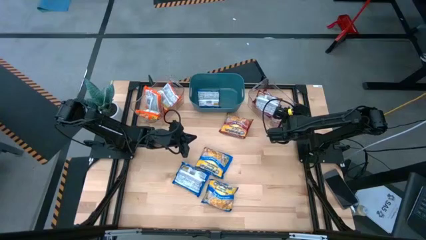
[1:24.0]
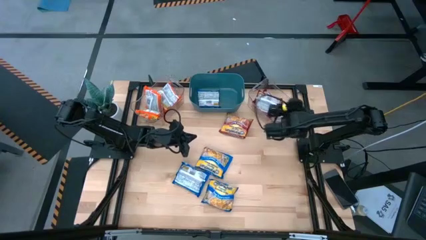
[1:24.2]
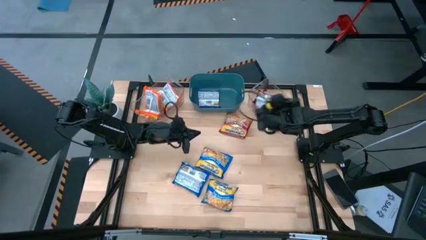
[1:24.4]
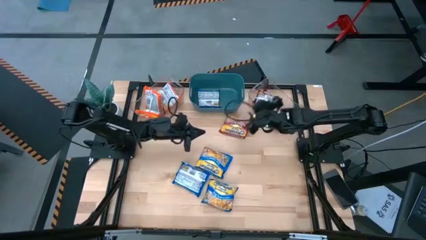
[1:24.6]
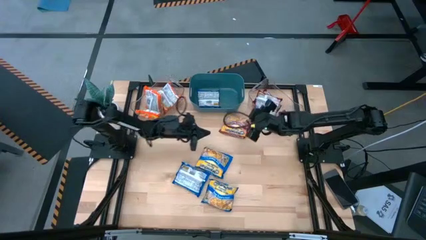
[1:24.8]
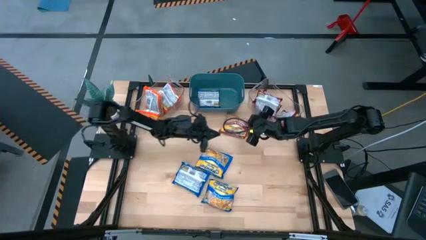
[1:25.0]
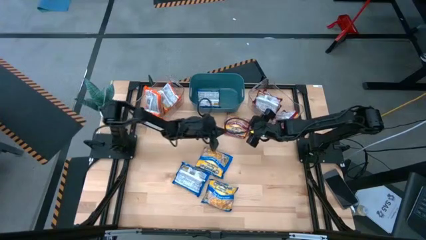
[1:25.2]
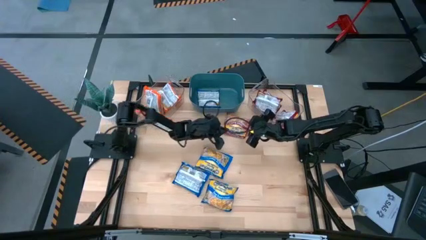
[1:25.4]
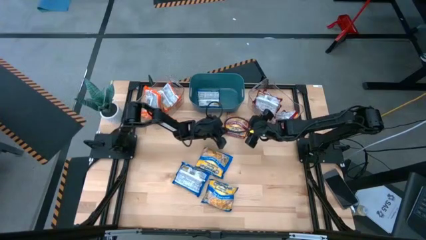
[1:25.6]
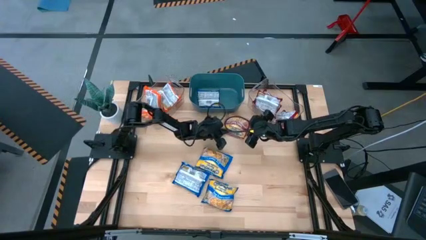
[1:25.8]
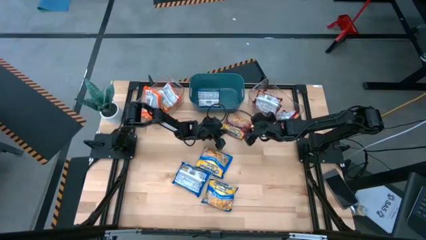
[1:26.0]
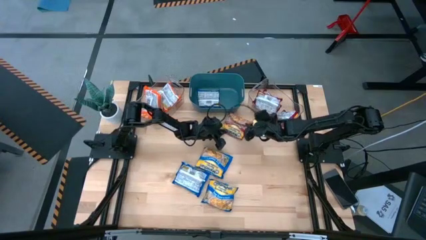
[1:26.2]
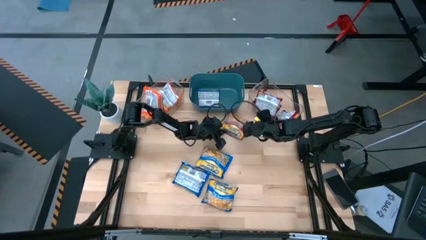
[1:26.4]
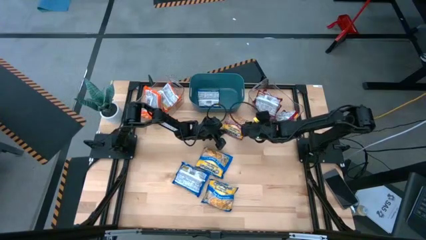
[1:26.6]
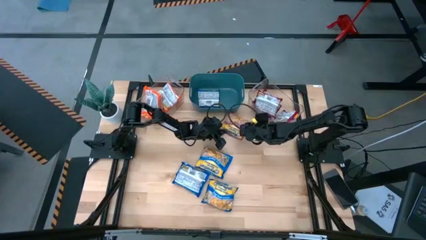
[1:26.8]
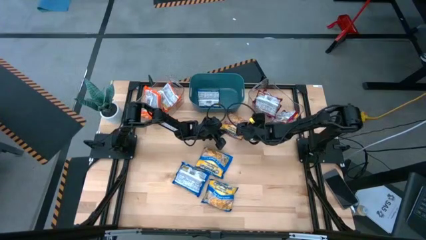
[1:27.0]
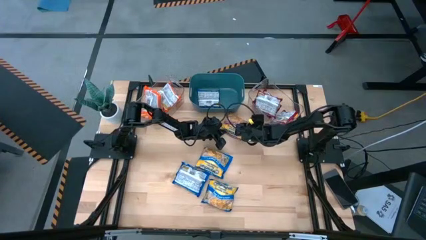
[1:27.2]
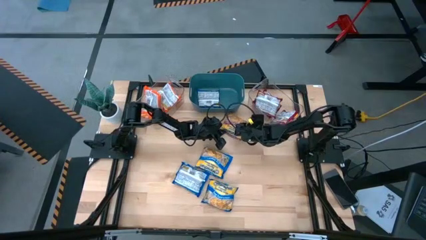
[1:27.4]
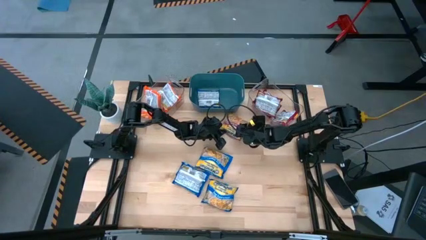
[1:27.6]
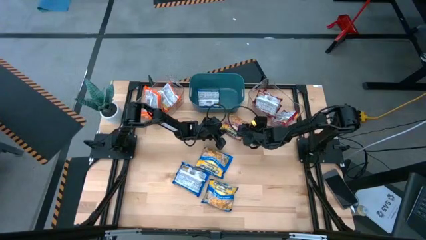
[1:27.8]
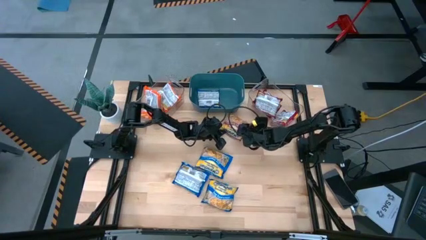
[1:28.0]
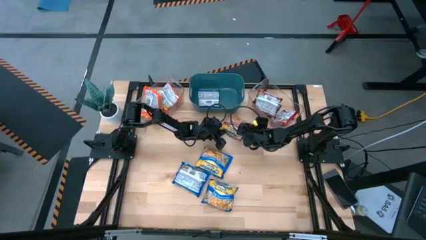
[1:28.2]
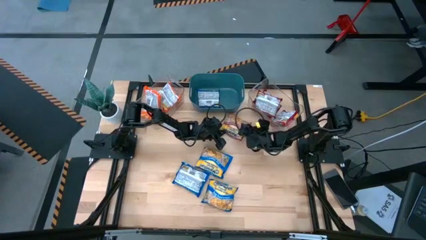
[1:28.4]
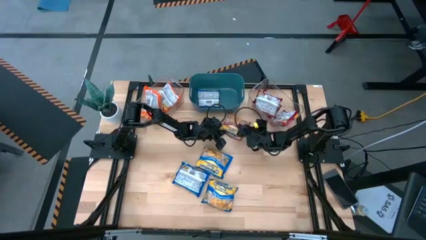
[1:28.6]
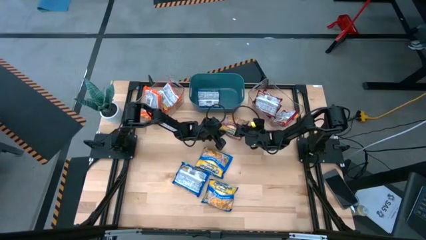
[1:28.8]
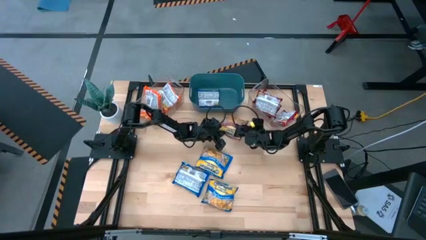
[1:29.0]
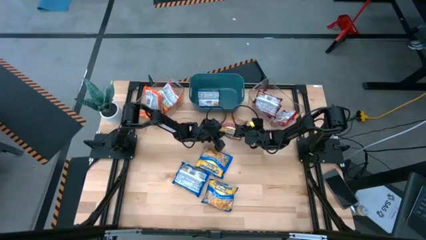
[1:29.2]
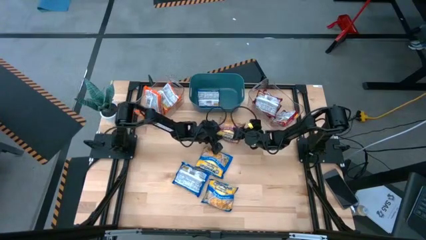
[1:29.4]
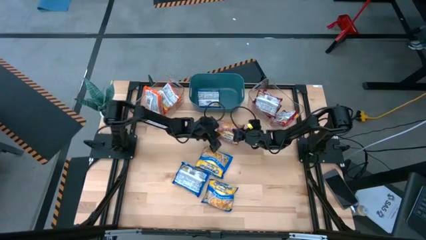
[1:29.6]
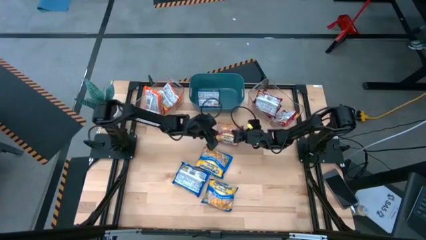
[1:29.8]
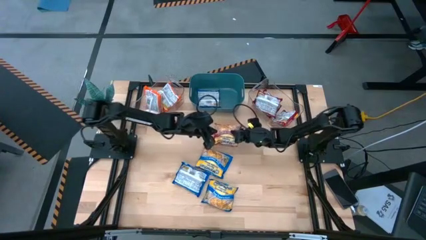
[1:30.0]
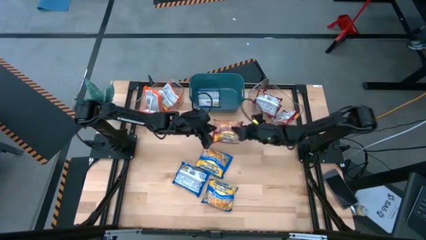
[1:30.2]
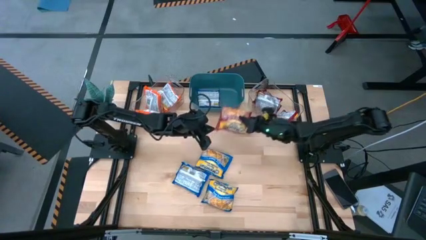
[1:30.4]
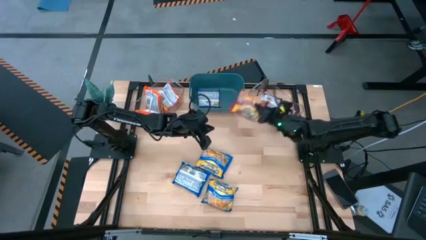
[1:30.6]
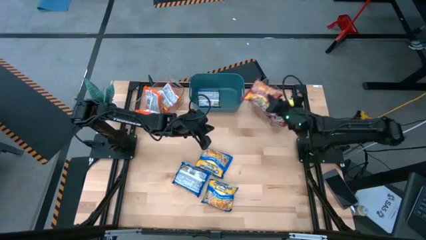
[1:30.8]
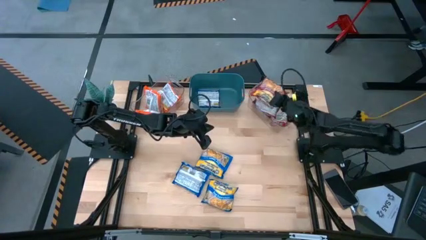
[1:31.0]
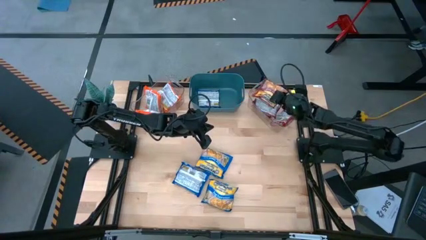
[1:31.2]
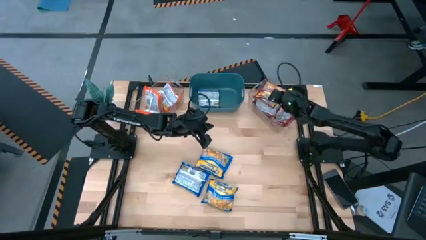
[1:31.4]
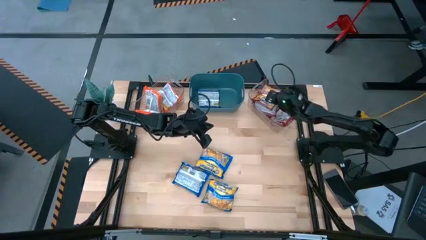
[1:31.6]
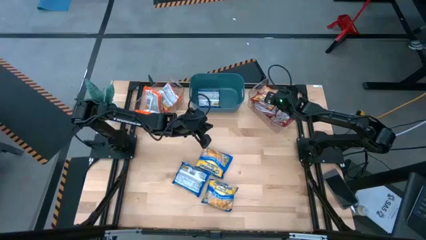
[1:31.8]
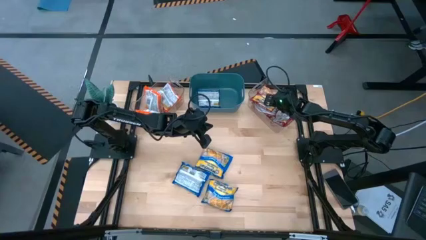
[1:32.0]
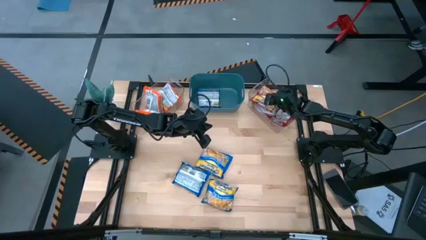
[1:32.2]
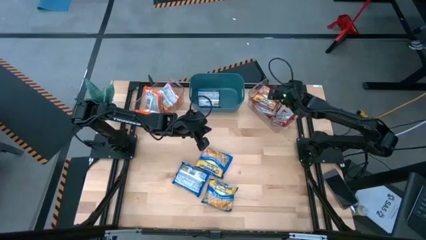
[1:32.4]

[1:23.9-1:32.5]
Task: Sort Maruchan noodles
Put the red noodle pack into the right transparent bin

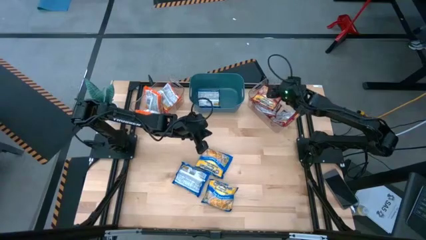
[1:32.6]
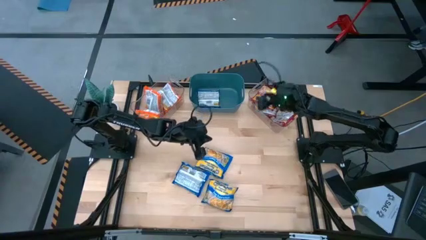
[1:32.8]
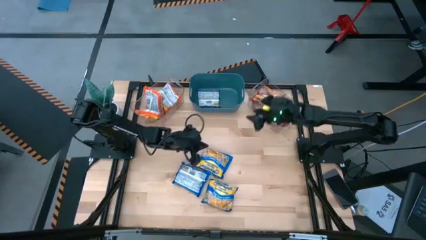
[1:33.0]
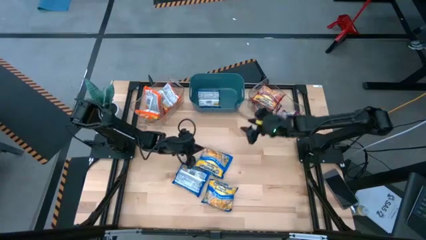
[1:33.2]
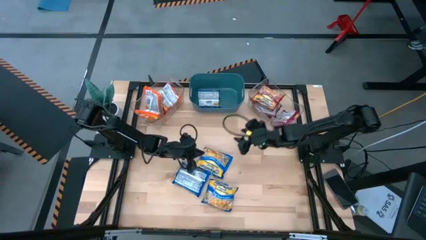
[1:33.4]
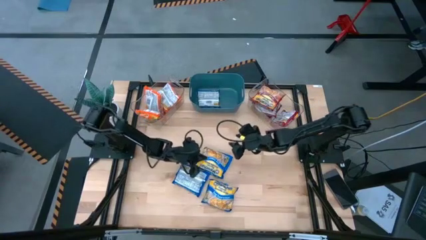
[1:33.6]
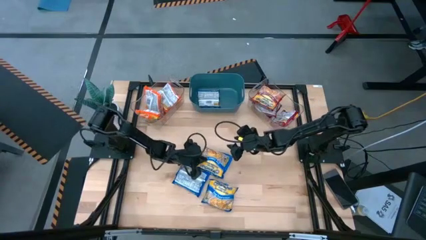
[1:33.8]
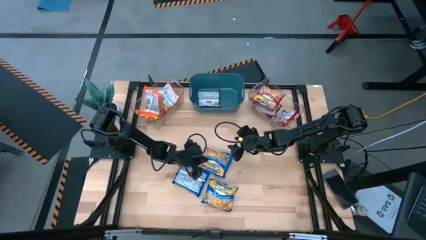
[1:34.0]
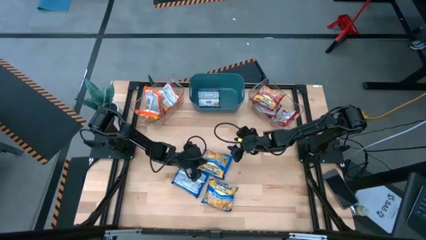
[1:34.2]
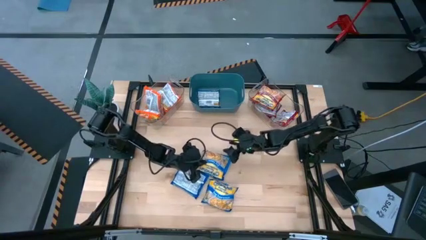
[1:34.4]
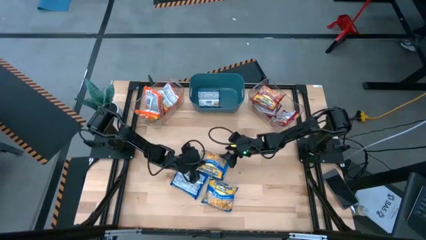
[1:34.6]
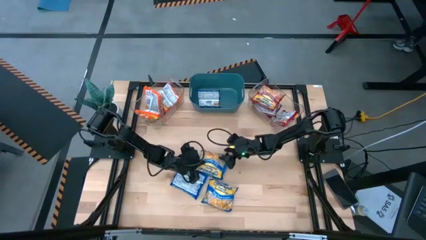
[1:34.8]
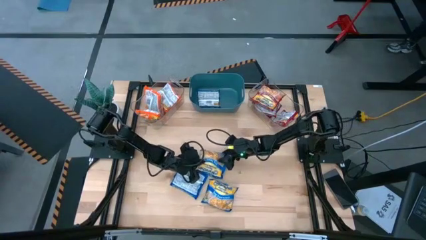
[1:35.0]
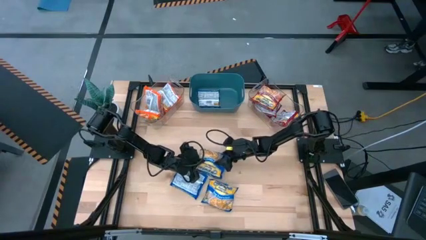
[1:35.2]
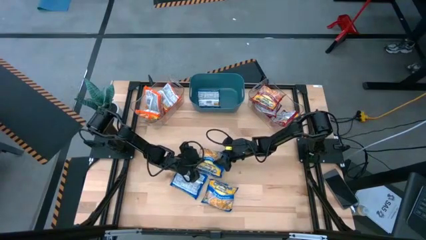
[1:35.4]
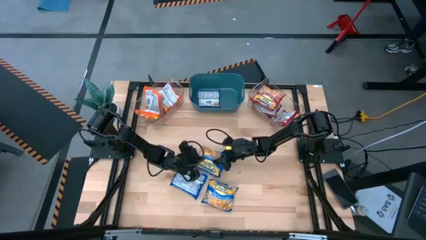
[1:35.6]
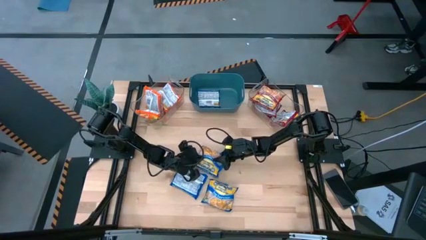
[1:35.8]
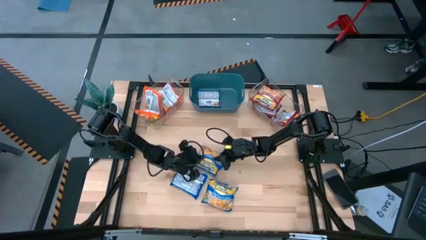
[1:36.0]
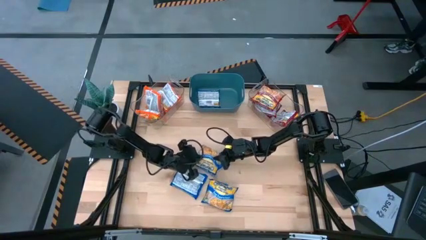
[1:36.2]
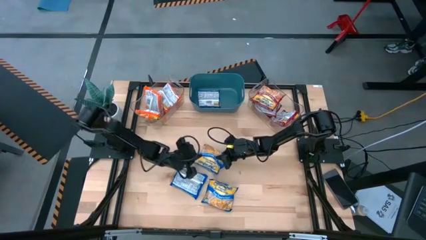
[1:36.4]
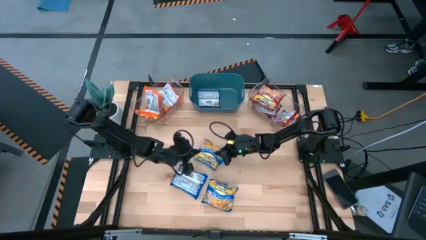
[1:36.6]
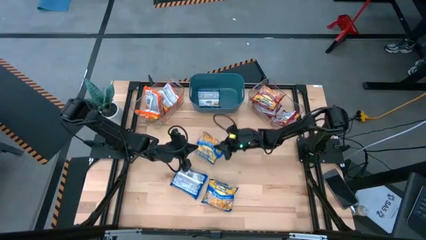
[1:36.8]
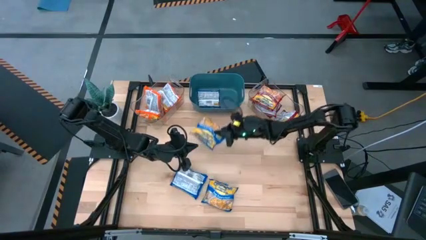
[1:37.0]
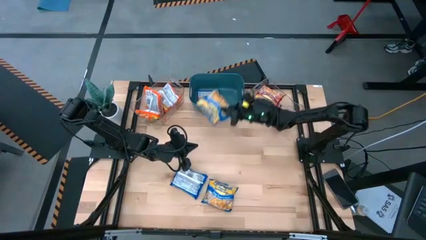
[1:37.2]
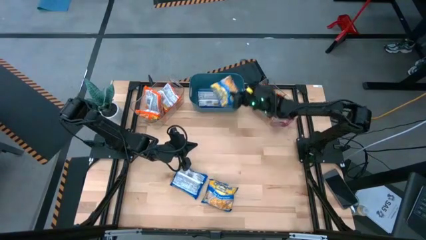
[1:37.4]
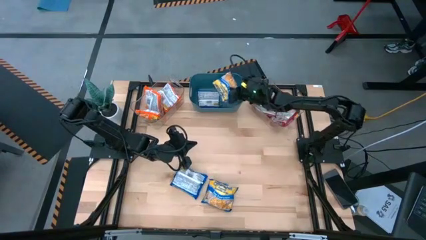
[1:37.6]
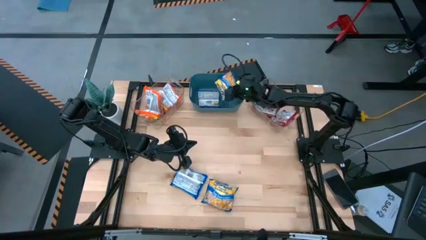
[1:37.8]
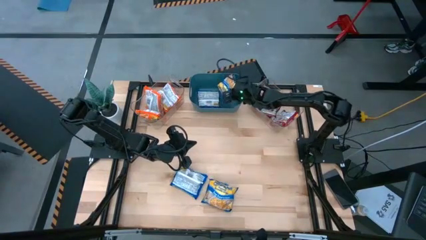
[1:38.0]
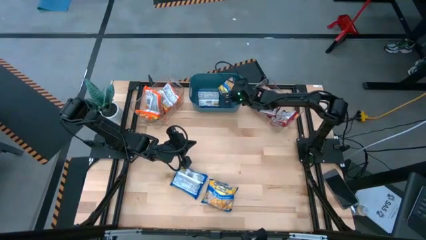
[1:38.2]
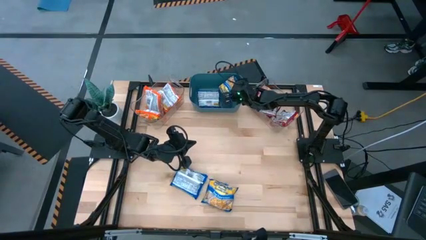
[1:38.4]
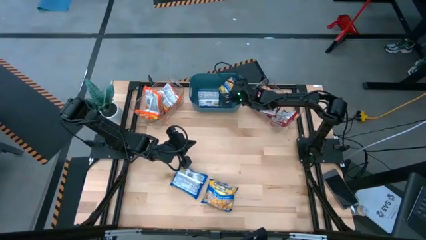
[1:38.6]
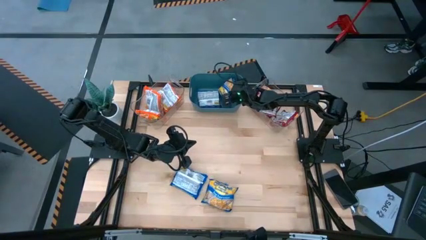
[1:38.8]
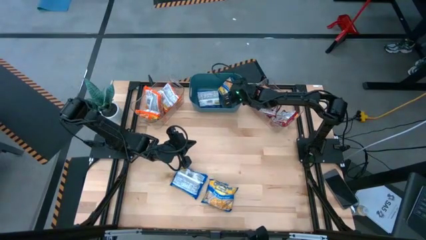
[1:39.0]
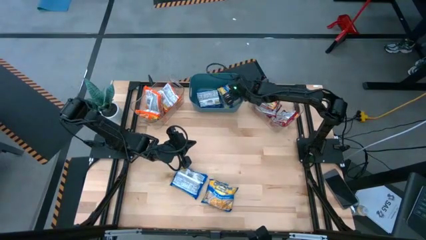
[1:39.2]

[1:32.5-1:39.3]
Put the blue noodle pack into the blue bin
